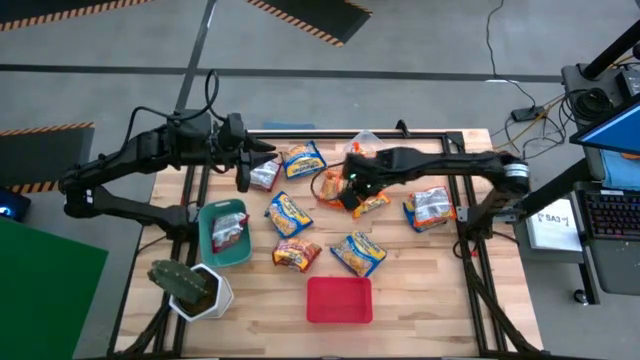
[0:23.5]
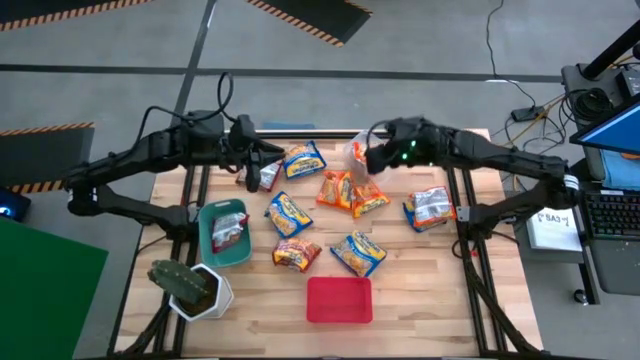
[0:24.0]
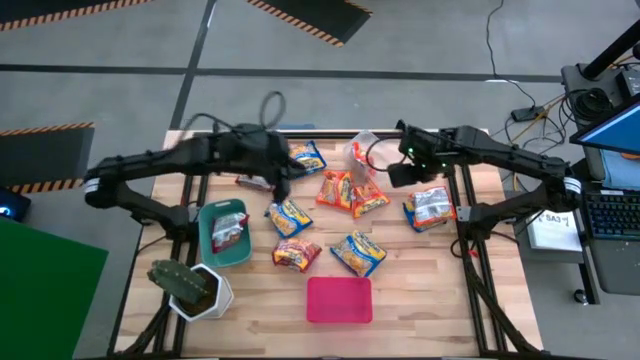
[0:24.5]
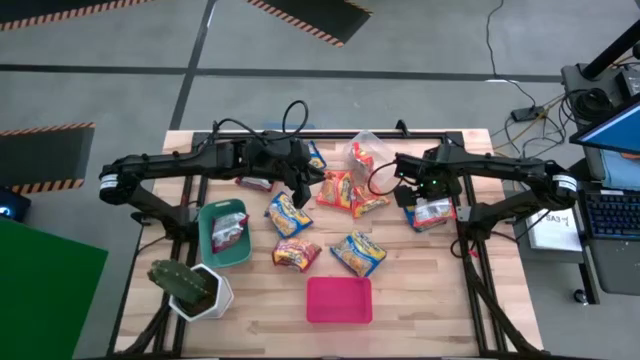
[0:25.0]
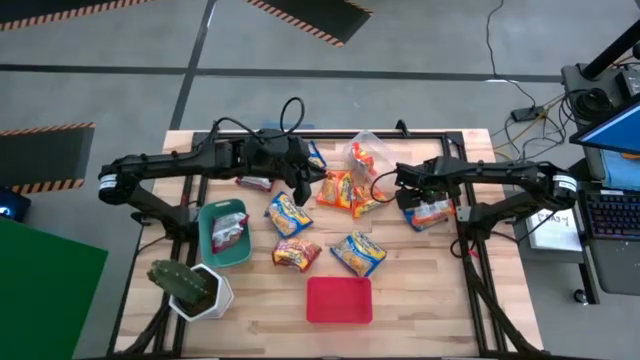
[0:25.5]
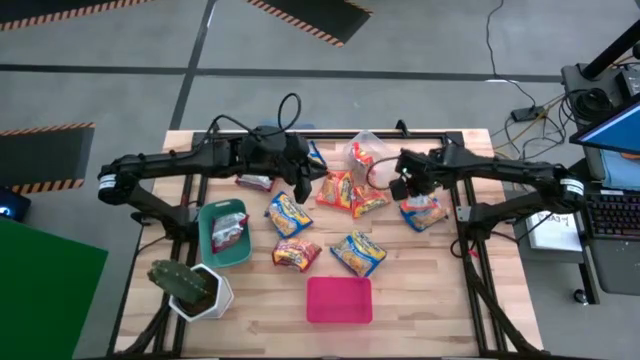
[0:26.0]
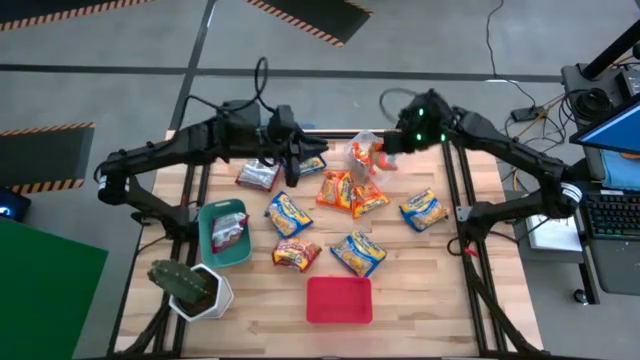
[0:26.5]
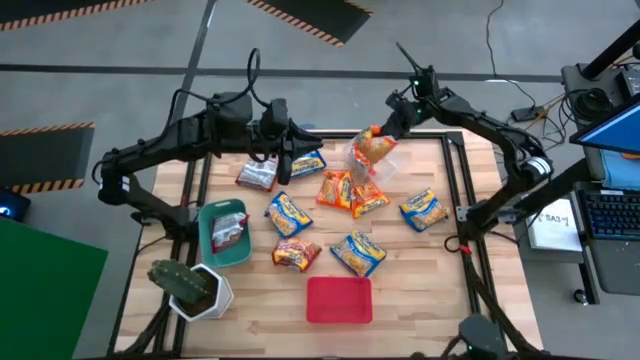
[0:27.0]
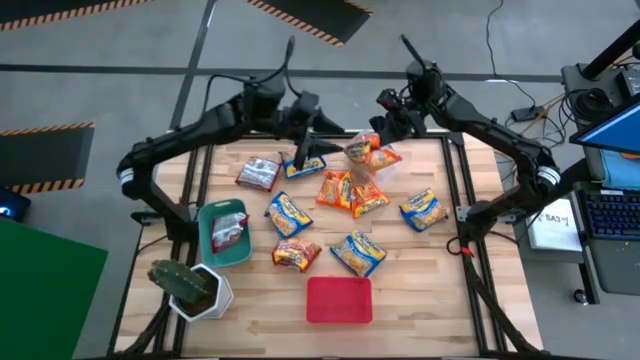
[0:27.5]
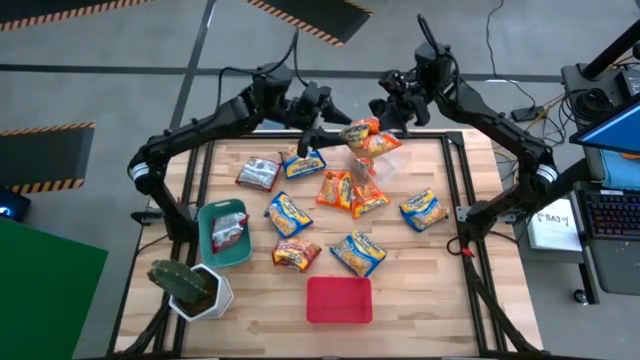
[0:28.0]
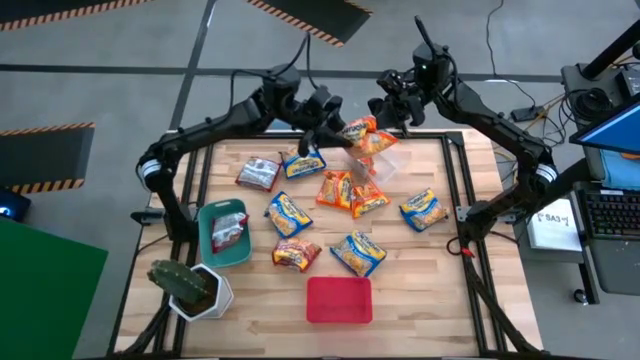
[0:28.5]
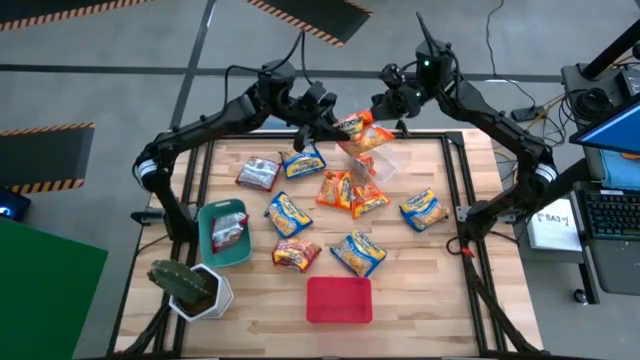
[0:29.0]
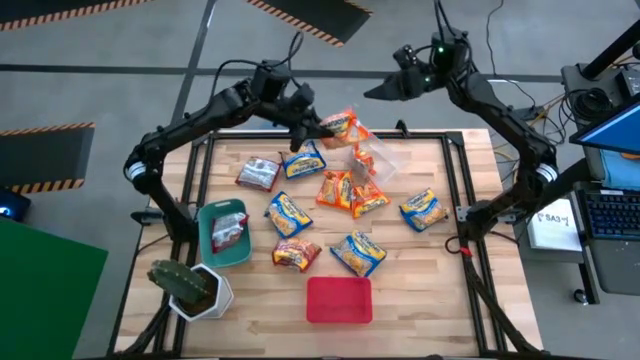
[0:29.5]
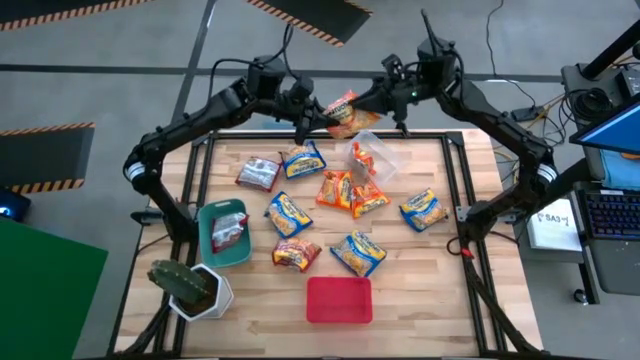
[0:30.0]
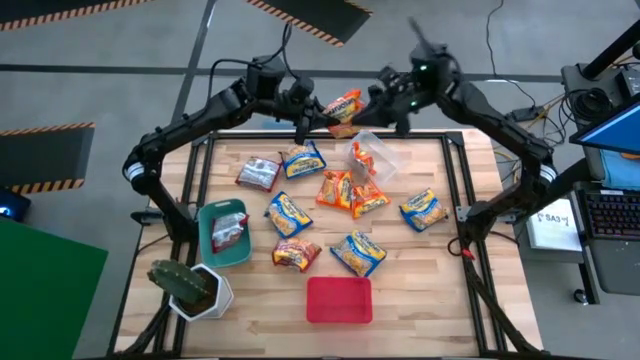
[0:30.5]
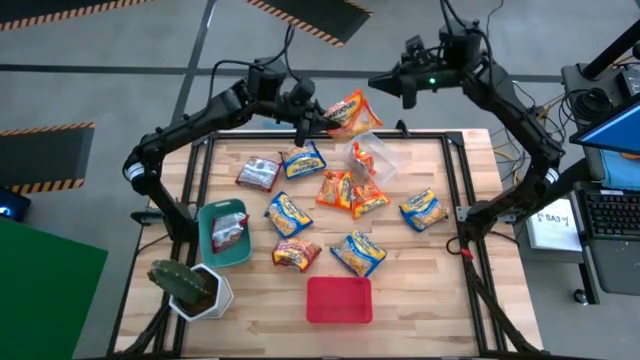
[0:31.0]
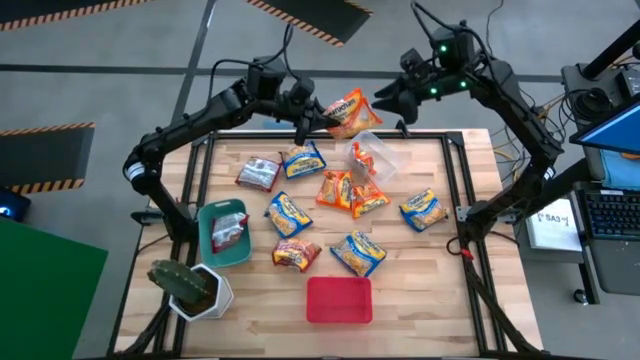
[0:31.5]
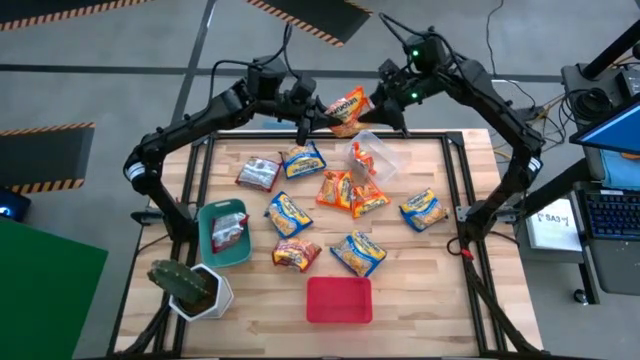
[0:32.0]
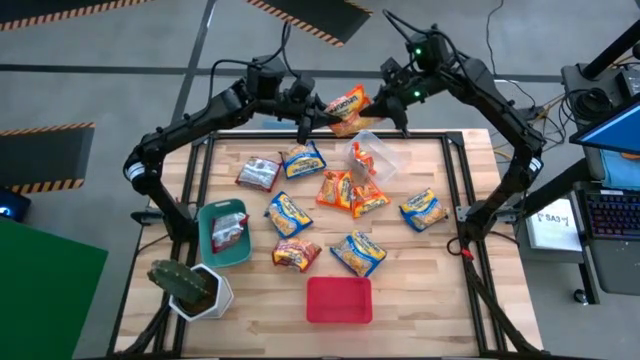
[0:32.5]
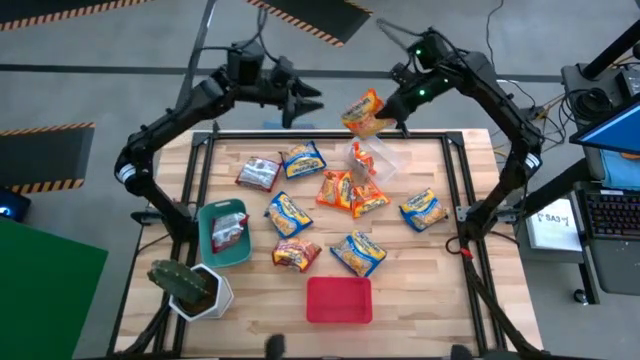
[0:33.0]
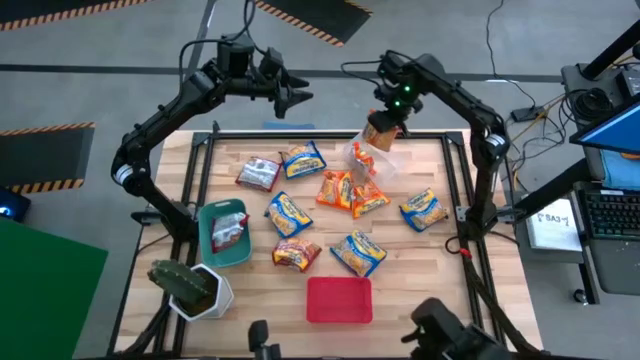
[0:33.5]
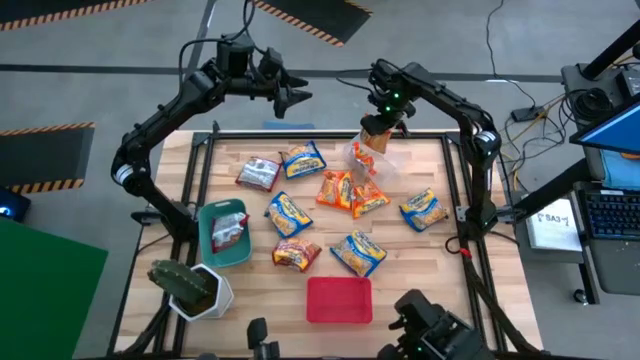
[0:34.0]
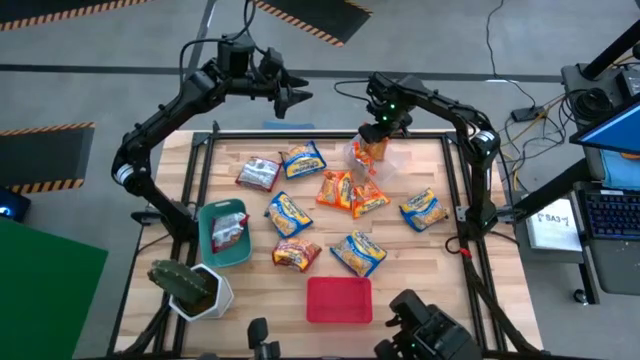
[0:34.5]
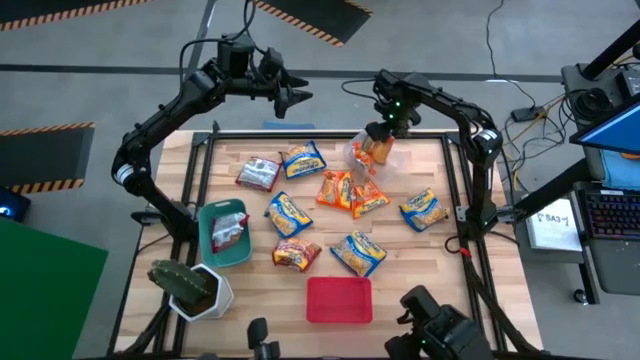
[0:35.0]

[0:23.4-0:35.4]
Task: Sort Maruchan noodles
Put the right orange noodle pack into the transparent bin

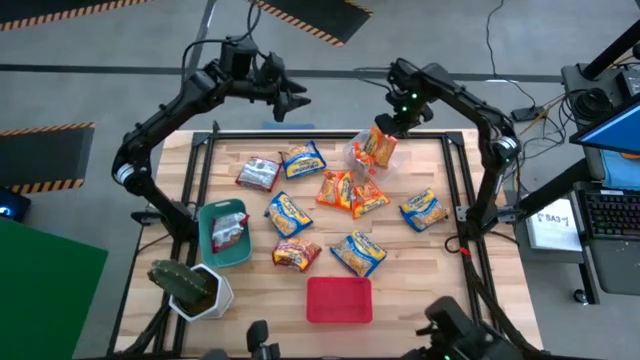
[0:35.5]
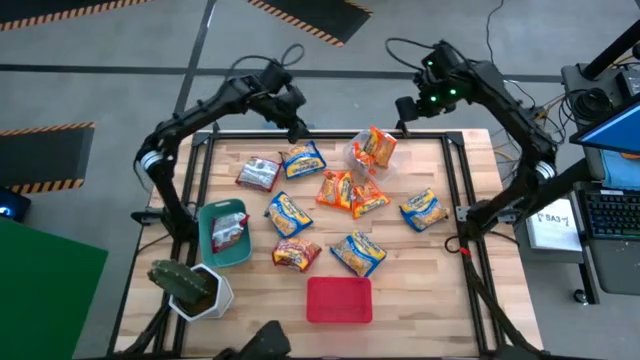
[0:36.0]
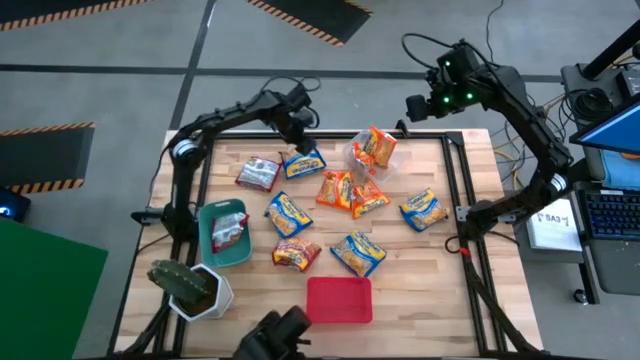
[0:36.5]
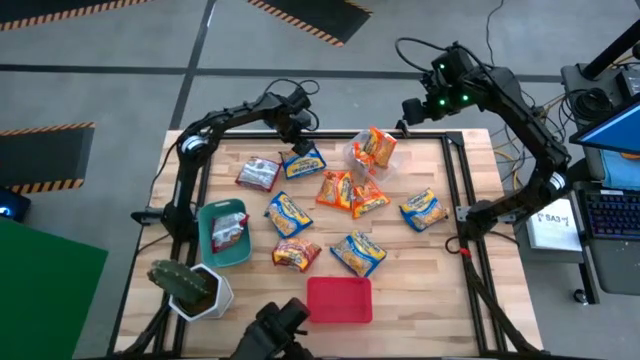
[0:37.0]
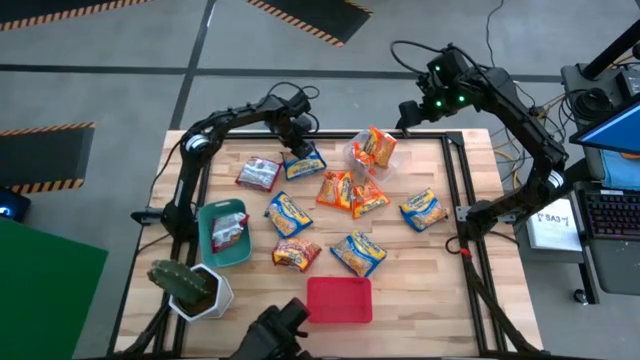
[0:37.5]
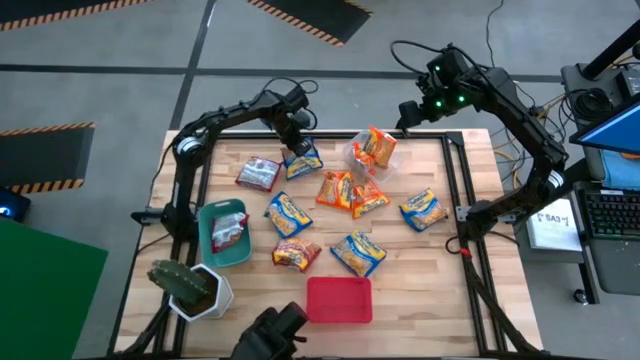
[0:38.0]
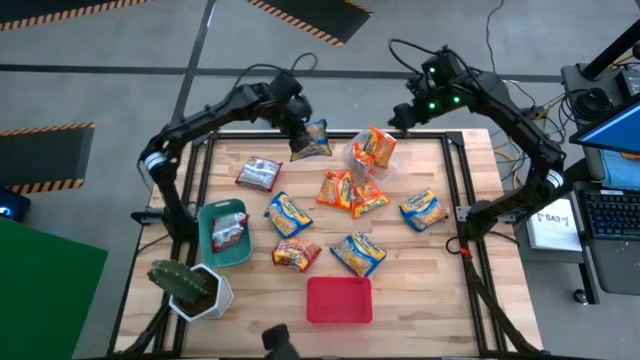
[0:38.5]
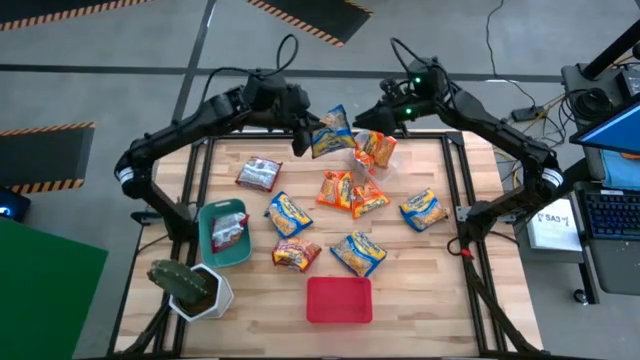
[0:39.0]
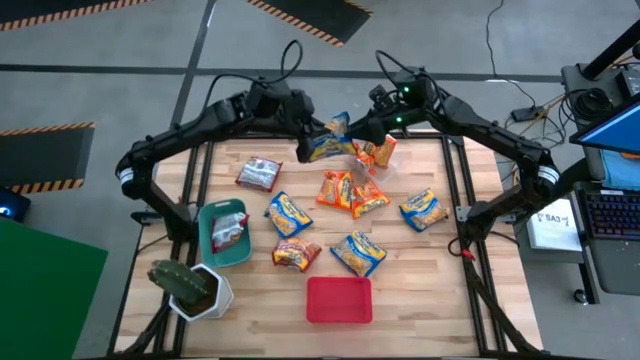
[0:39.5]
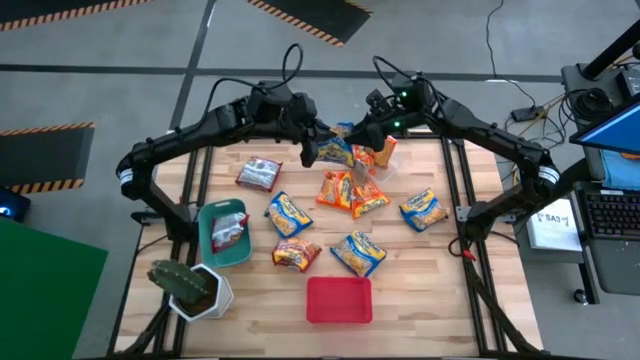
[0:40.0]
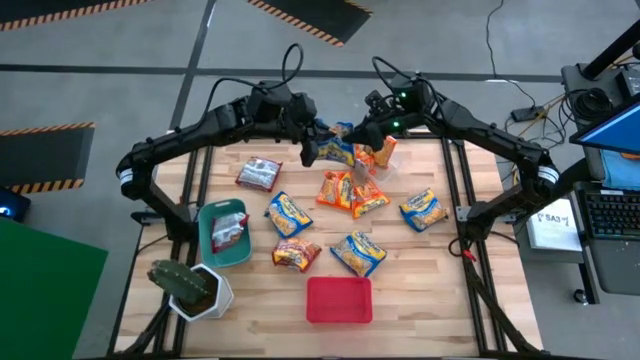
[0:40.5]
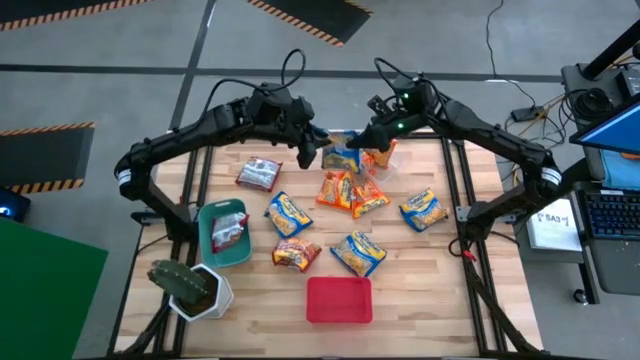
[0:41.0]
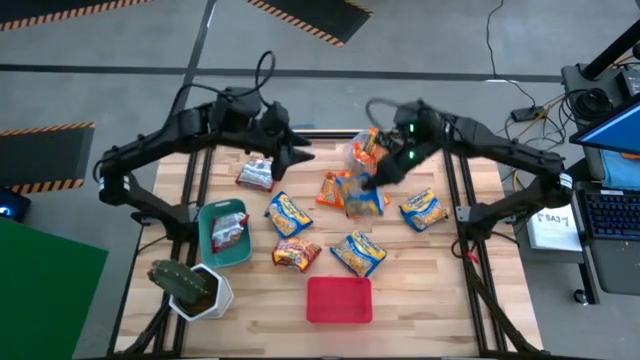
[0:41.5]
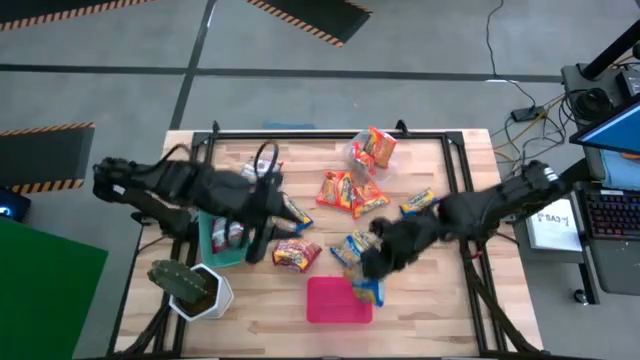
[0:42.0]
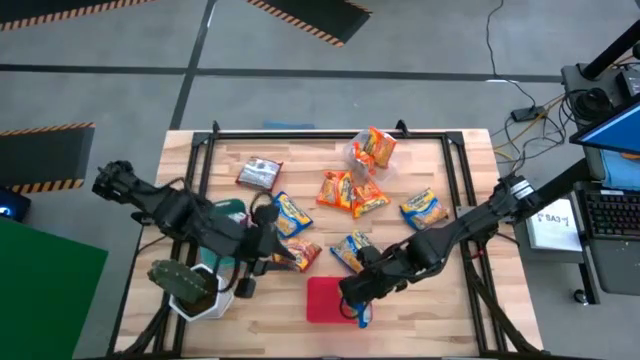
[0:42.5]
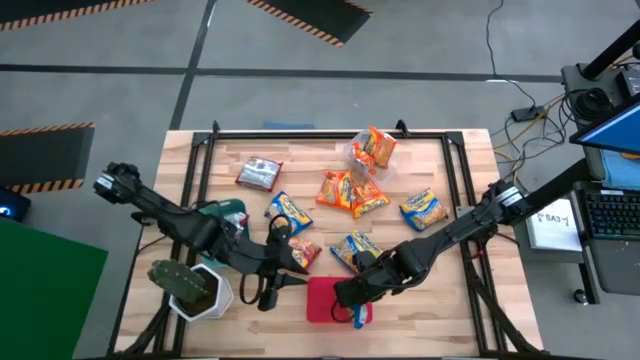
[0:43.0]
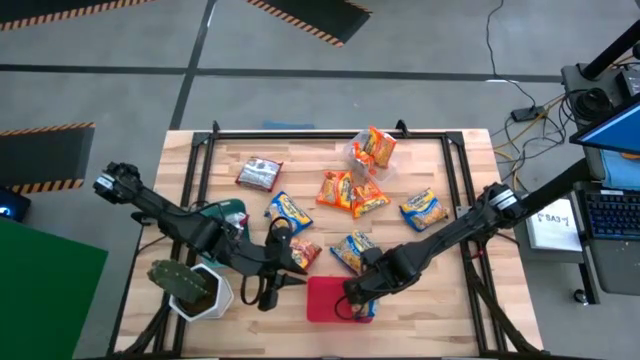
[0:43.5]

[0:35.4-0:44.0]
Put the top blue noodle pack into the red bin
